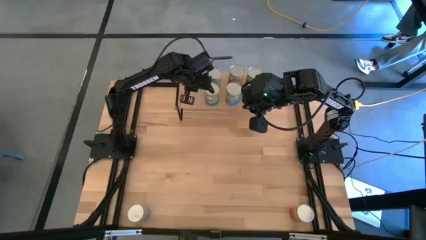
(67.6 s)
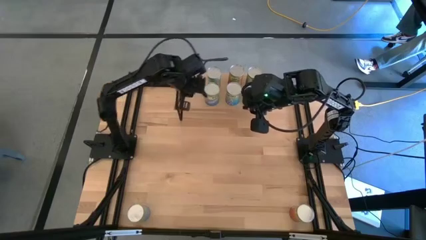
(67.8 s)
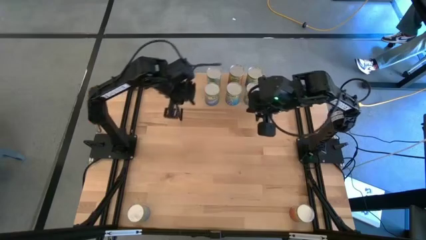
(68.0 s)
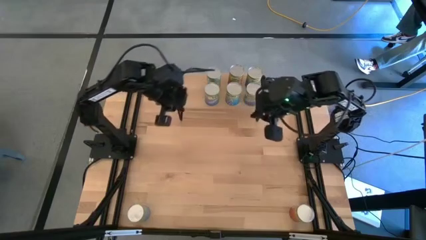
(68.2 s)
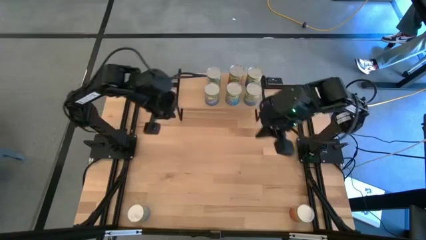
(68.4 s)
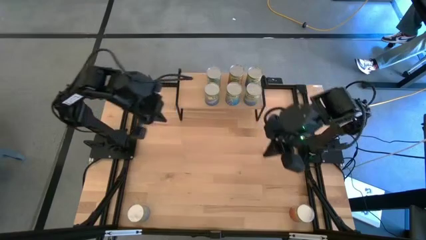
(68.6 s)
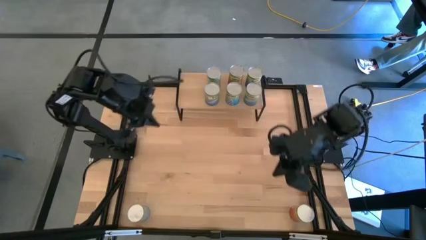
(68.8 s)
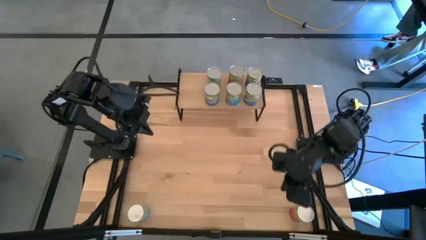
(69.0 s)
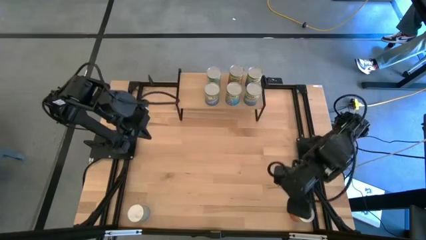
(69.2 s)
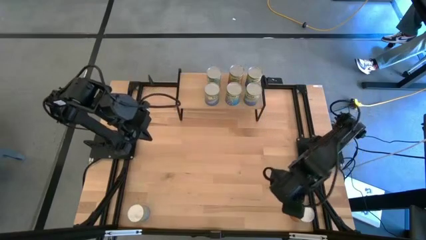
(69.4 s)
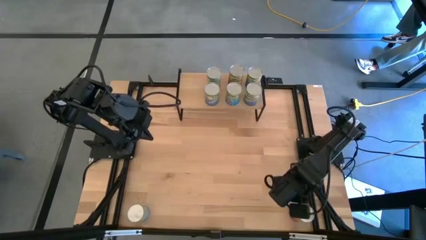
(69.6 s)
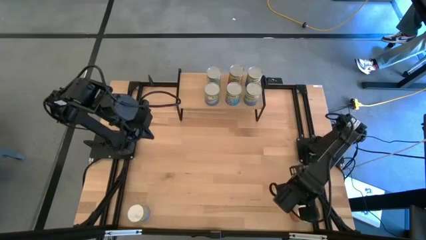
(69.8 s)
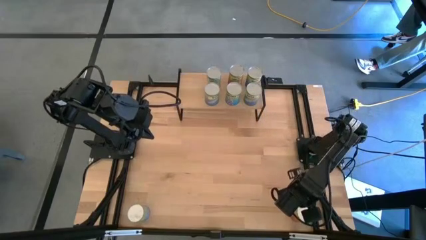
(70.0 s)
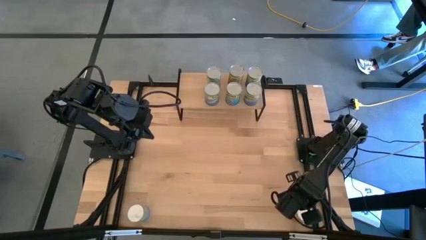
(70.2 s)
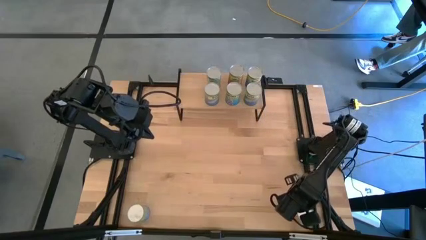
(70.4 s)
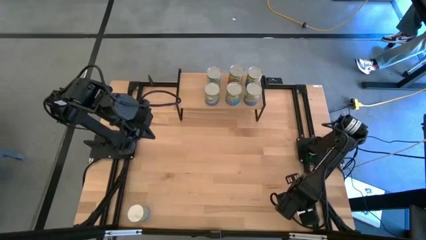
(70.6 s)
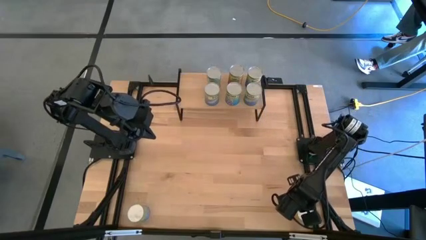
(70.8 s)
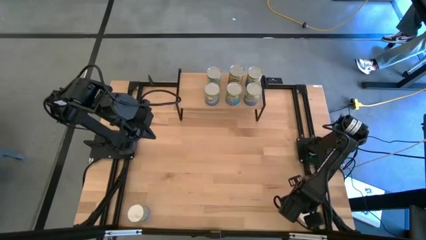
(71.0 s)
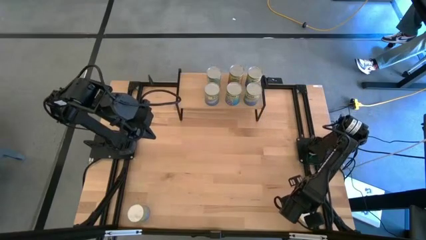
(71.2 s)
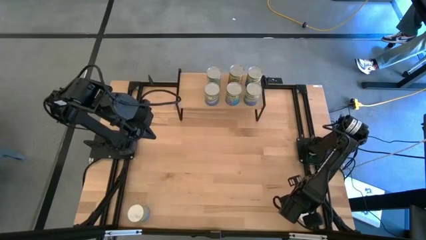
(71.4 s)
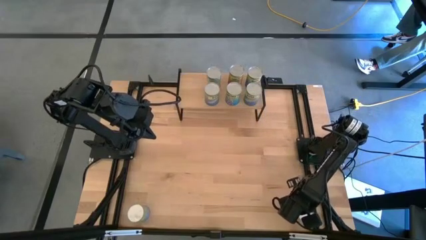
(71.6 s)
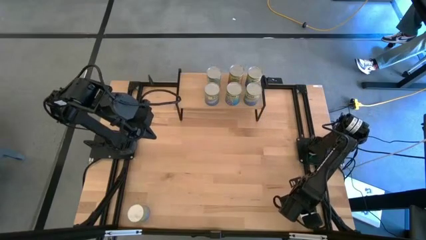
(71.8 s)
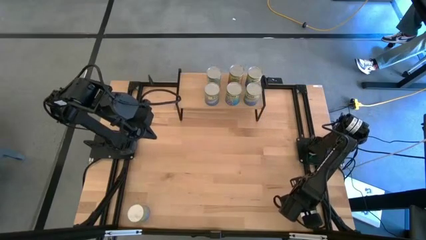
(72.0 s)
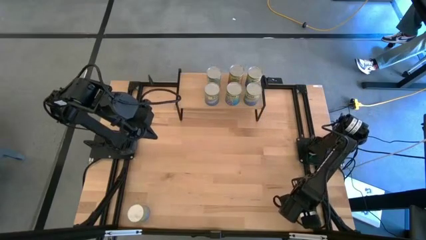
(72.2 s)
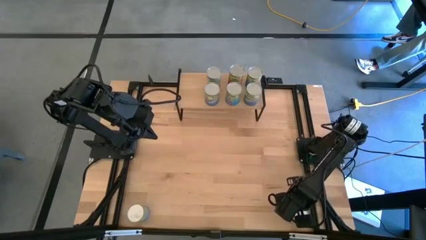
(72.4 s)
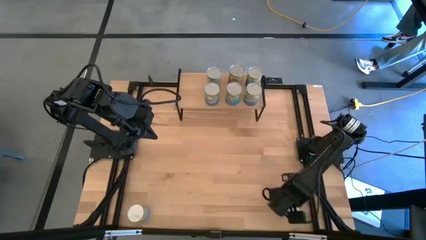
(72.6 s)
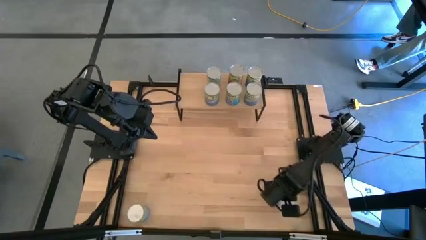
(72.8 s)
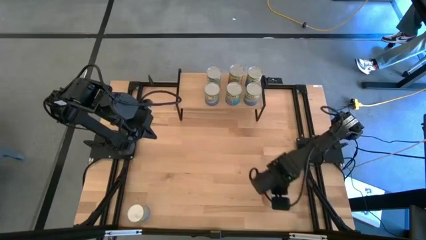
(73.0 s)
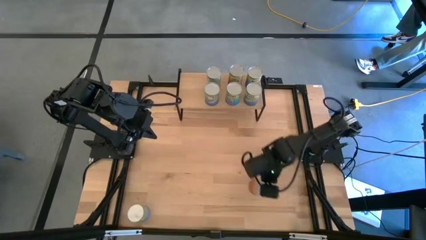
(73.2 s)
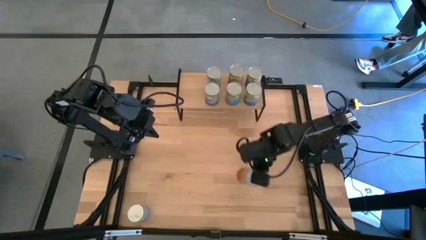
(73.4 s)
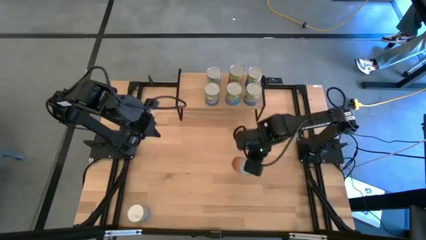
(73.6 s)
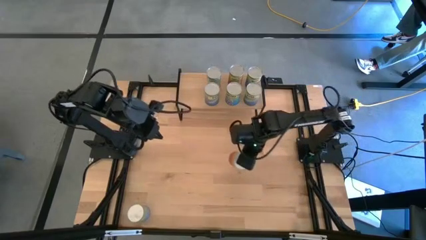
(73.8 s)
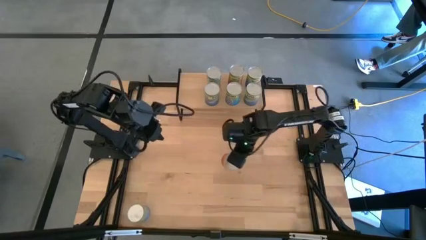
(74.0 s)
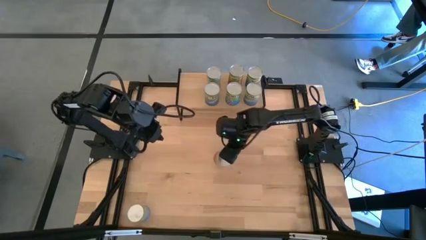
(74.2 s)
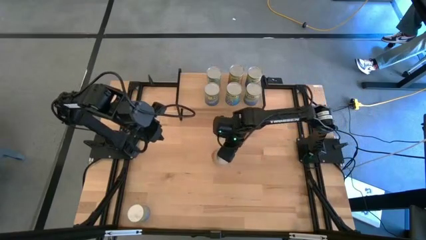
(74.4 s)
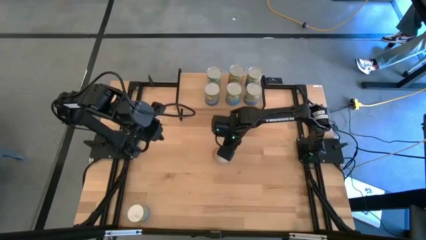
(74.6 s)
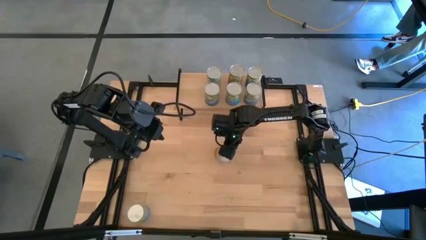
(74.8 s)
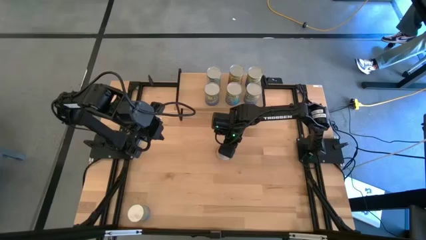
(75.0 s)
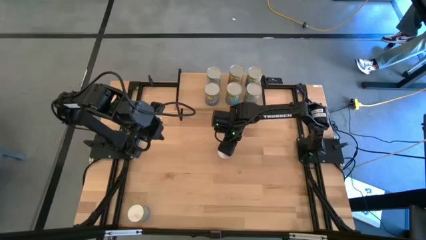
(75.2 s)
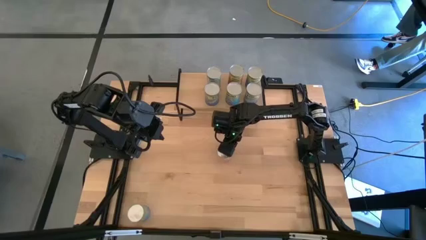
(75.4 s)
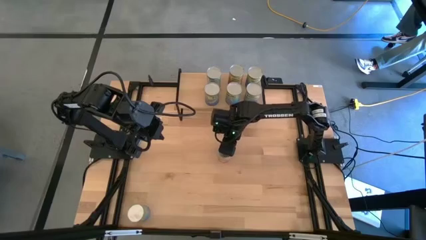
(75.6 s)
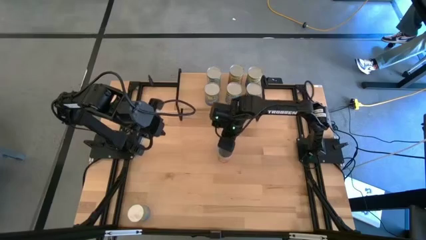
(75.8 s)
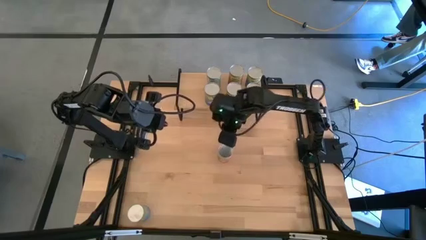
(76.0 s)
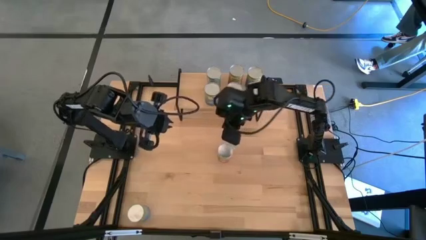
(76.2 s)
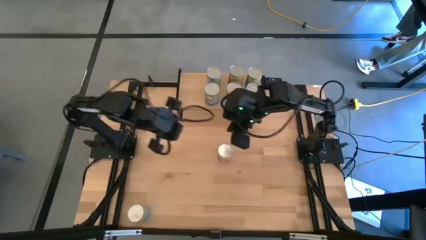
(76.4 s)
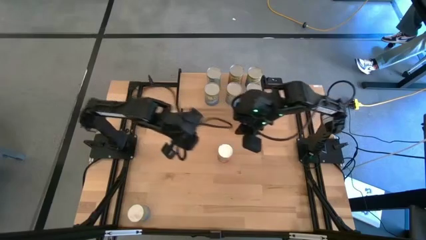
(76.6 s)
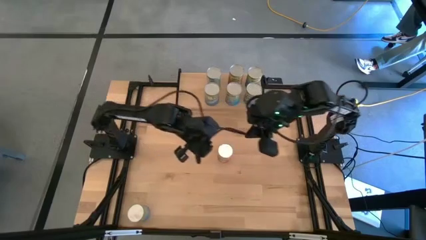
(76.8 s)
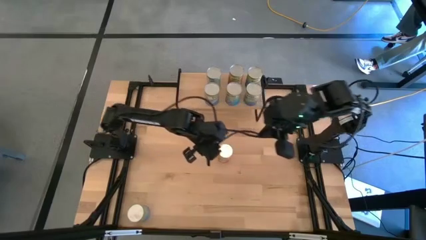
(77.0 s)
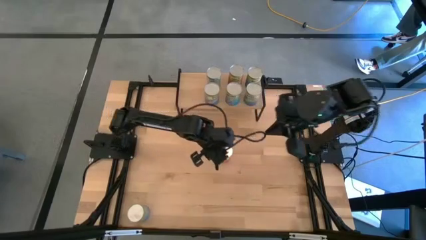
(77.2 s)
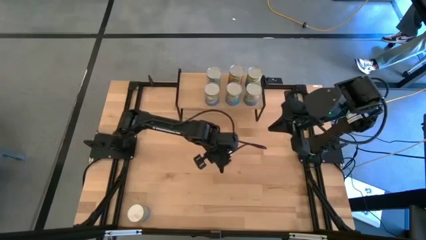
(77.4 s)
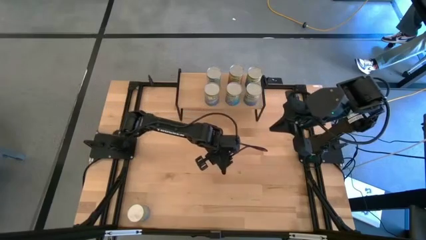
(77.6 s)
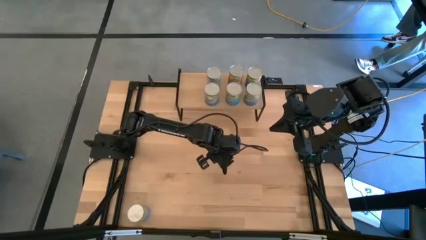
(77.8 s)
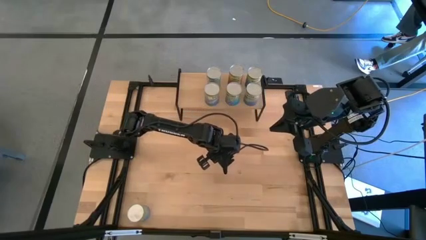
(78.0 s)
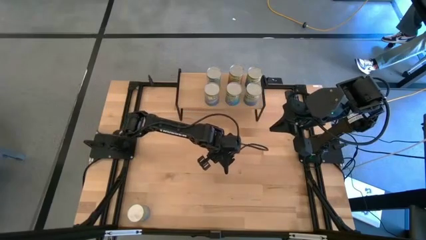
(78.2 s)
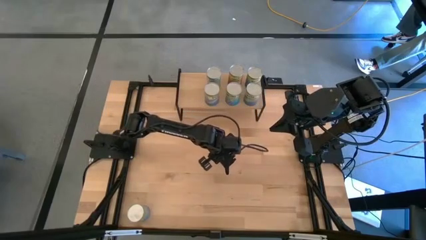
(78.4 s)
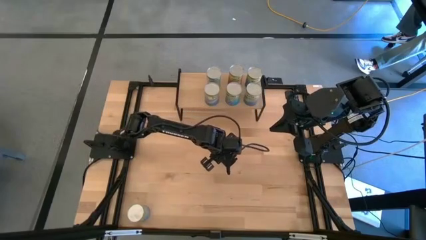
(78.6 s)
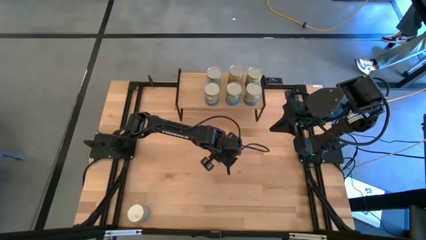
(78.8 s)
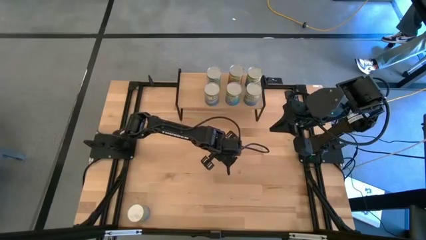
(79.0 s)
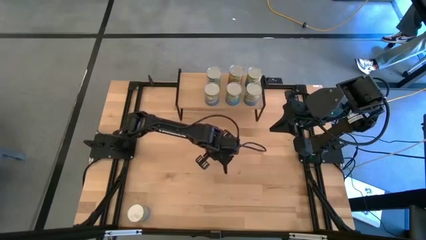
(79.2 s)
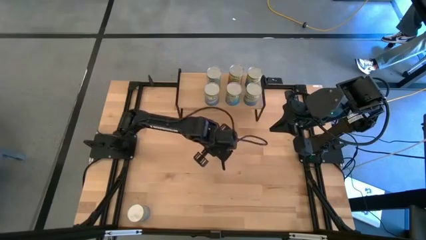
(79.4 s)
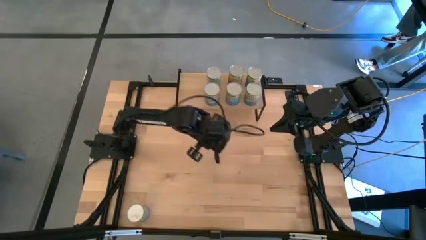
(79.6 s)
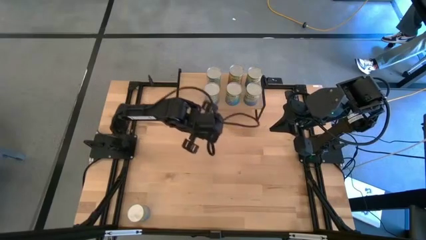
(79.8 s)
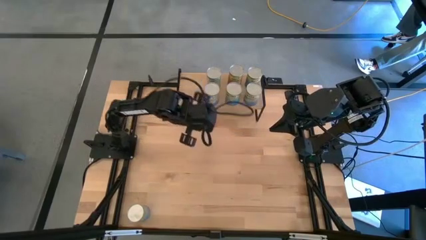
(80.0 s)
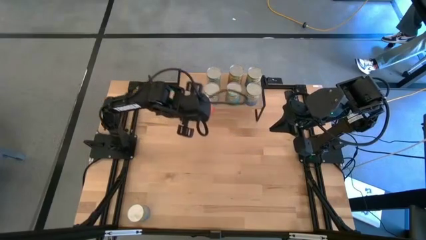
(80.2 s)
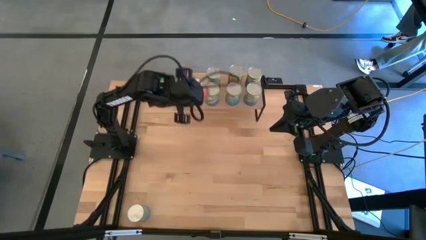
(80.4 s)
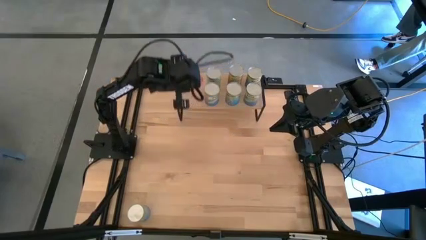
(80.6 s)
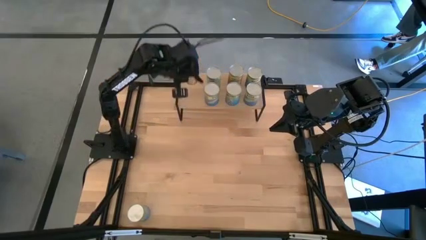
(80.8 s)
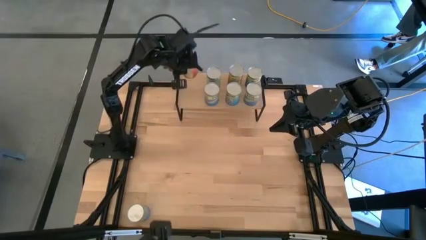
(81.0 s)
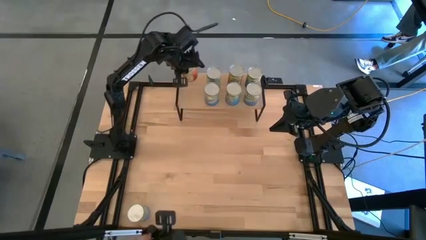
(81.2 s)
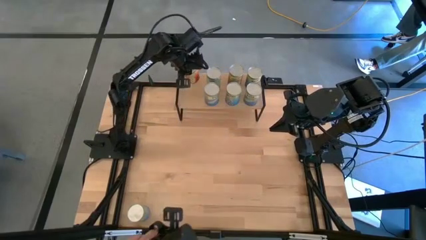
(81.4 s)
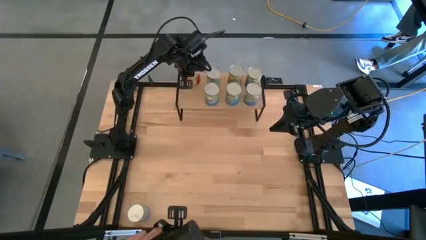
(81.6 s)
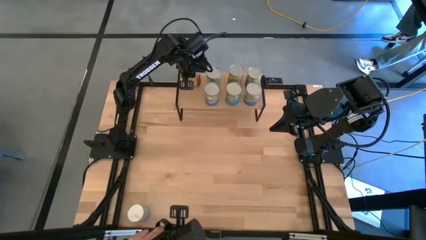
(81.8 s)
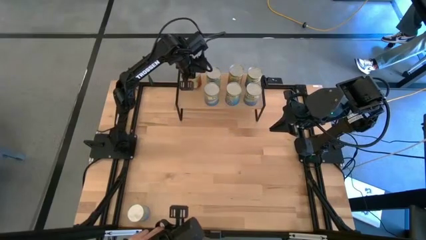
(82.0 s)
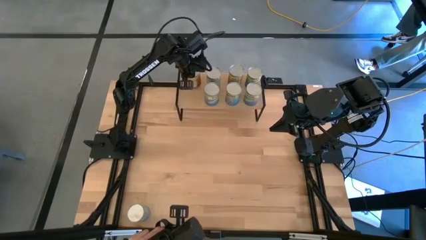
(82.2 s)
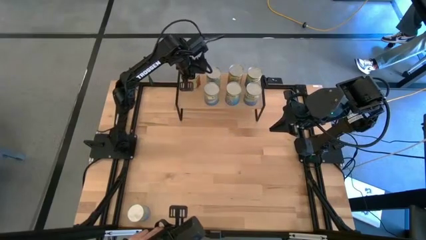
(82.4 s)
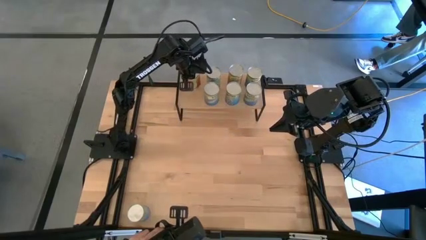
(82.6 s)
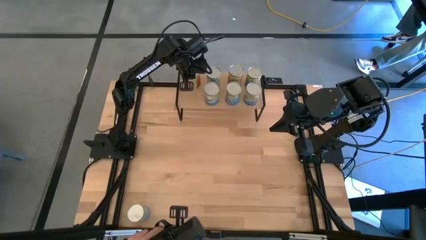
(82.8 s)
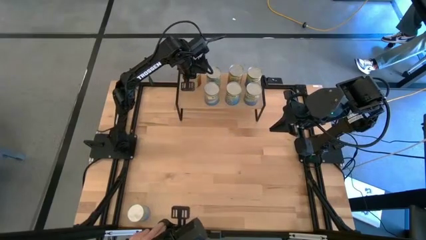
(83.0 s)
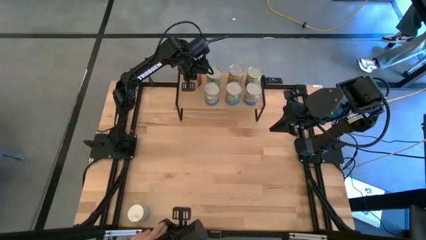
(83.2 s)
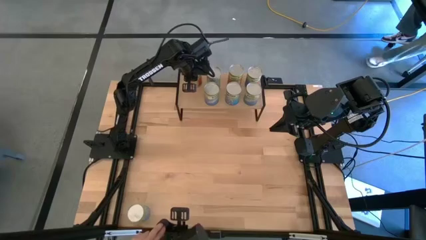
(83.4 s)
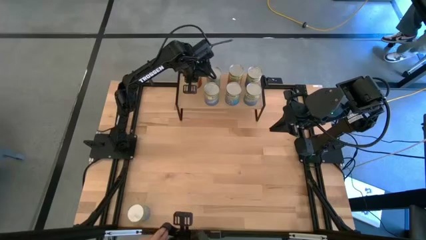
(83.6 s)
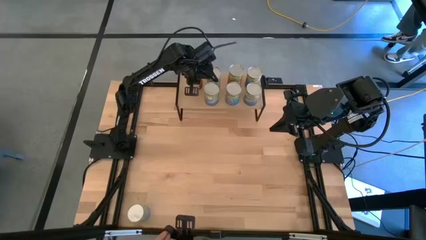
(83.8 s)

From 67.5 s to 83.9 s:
Task: Pick and place cans onto a shelf
Put the canned pineapple on the shelf
